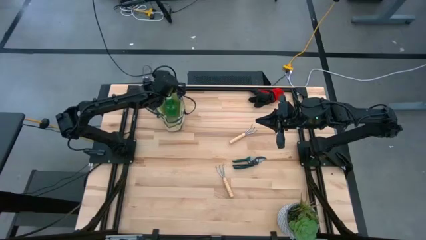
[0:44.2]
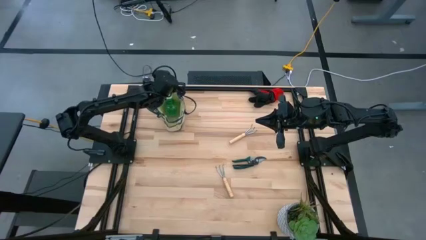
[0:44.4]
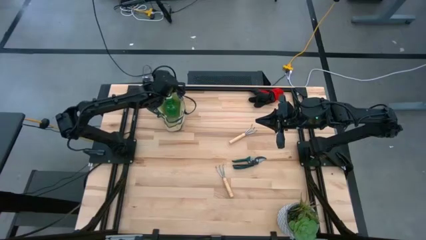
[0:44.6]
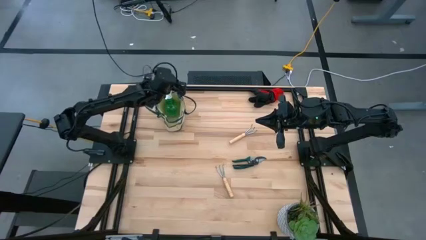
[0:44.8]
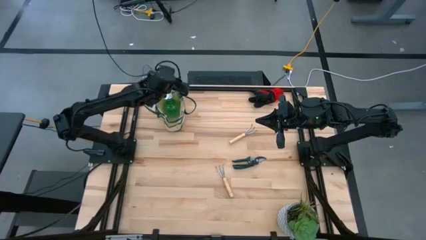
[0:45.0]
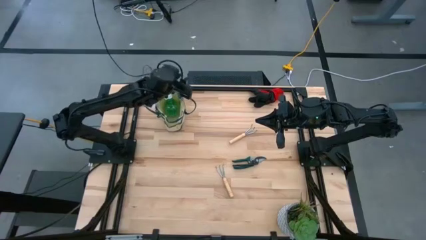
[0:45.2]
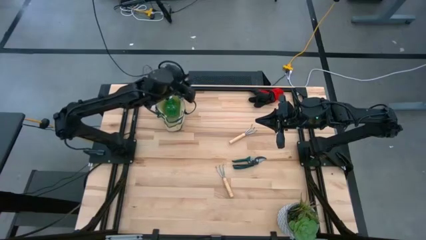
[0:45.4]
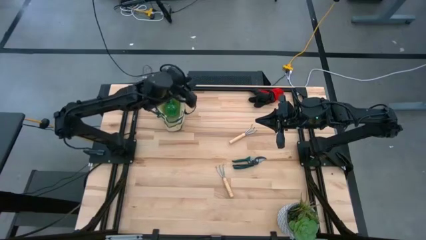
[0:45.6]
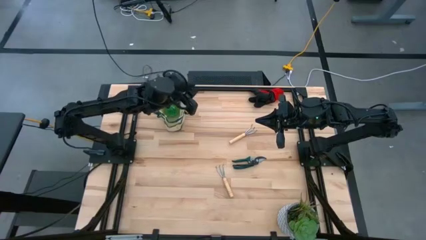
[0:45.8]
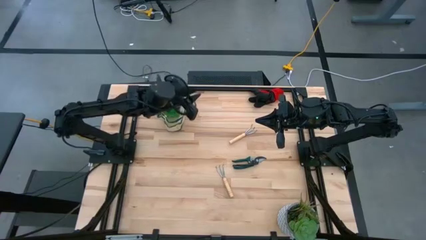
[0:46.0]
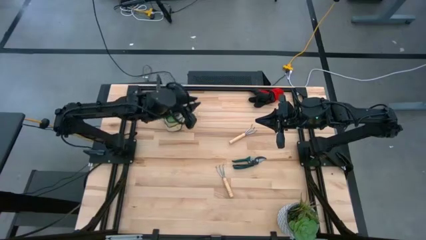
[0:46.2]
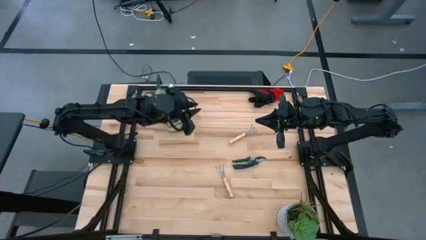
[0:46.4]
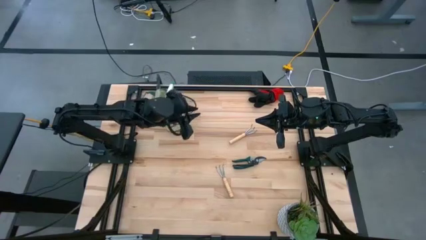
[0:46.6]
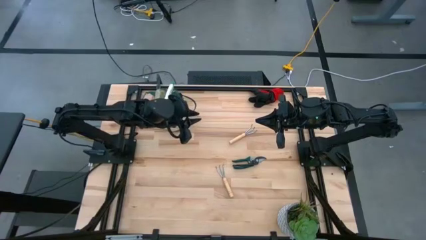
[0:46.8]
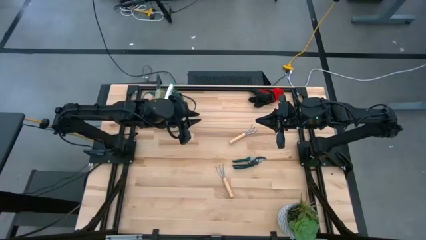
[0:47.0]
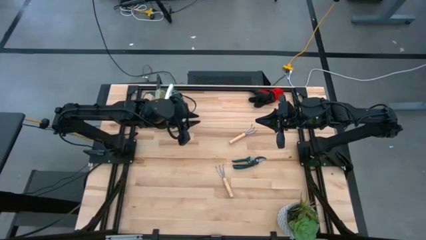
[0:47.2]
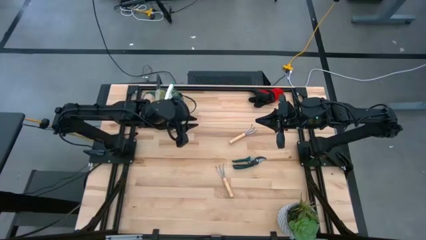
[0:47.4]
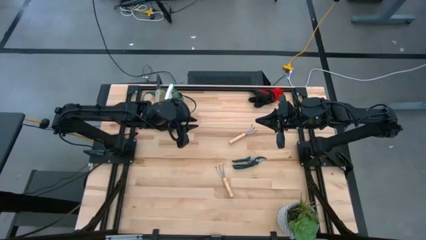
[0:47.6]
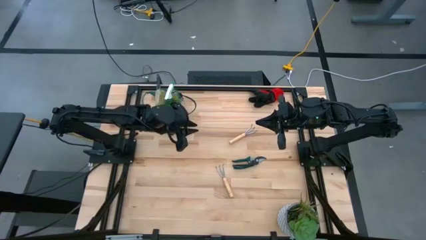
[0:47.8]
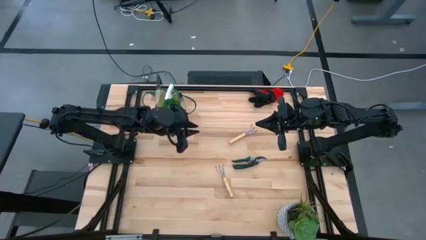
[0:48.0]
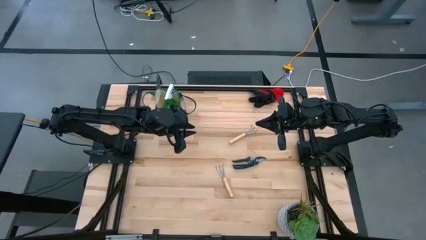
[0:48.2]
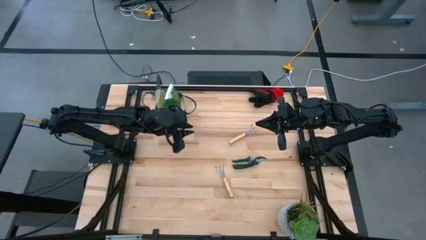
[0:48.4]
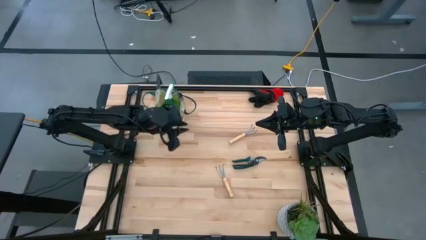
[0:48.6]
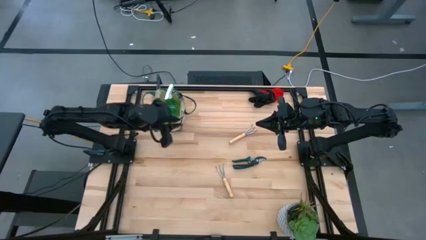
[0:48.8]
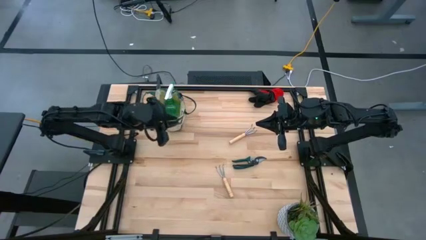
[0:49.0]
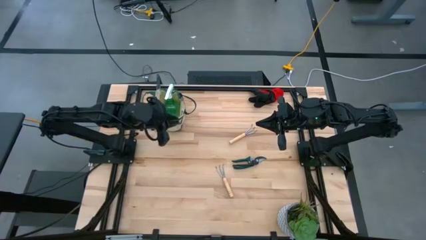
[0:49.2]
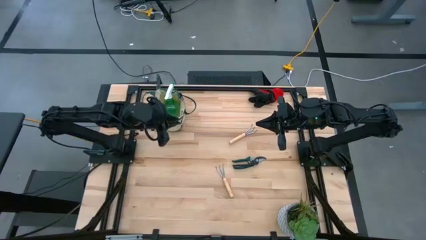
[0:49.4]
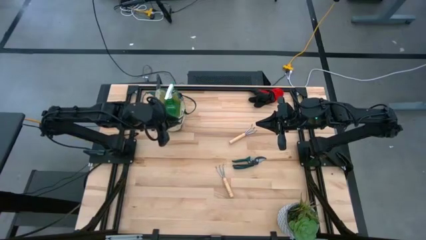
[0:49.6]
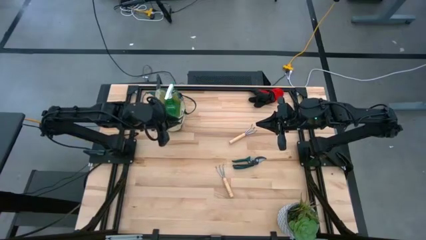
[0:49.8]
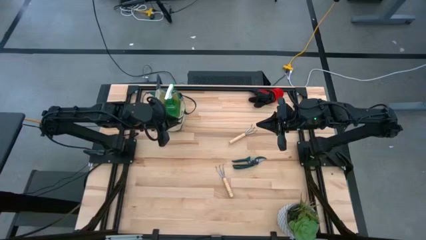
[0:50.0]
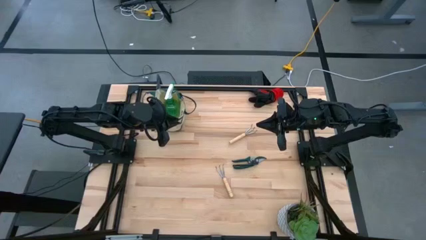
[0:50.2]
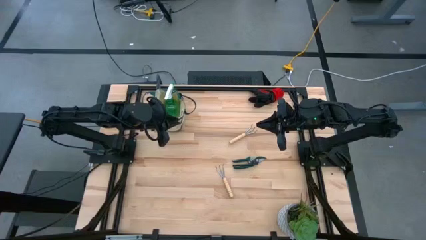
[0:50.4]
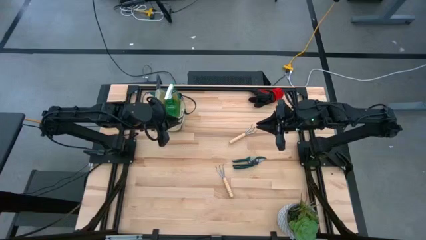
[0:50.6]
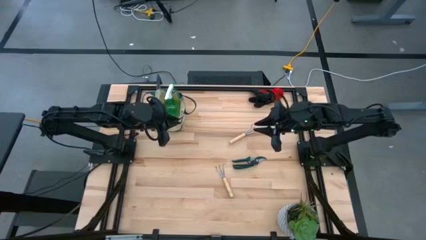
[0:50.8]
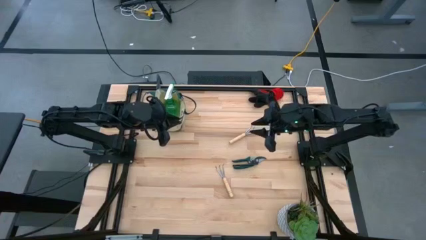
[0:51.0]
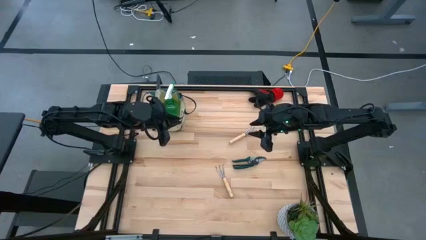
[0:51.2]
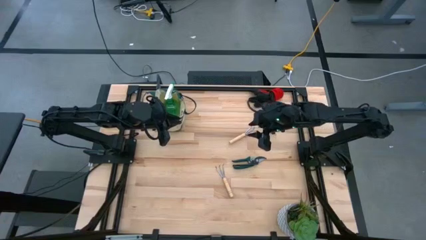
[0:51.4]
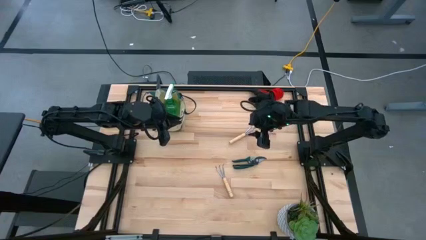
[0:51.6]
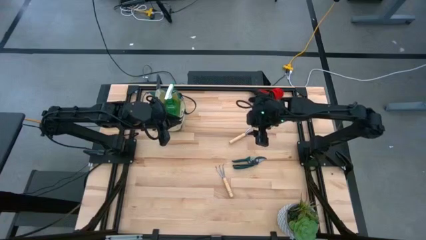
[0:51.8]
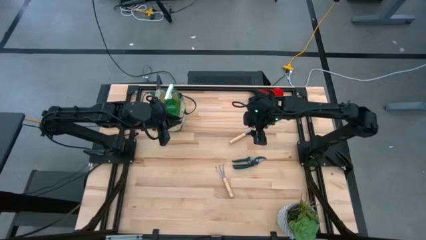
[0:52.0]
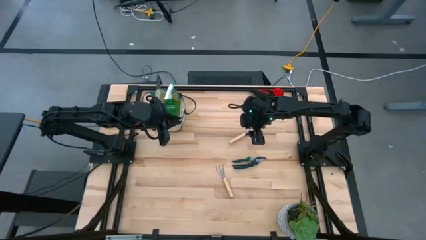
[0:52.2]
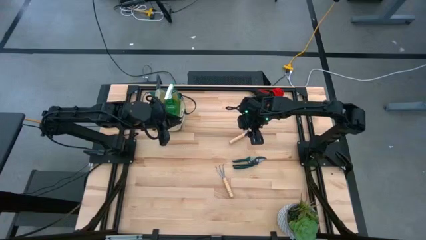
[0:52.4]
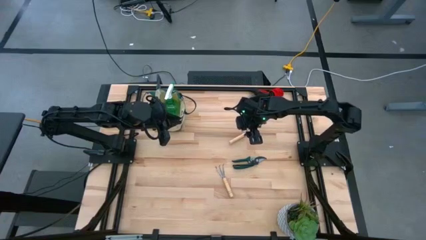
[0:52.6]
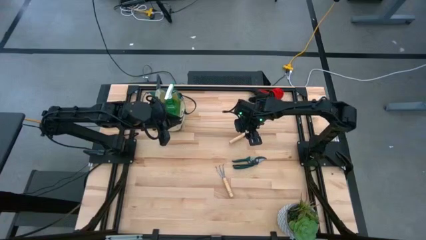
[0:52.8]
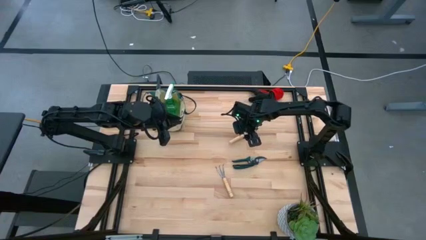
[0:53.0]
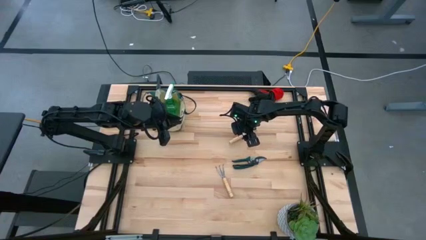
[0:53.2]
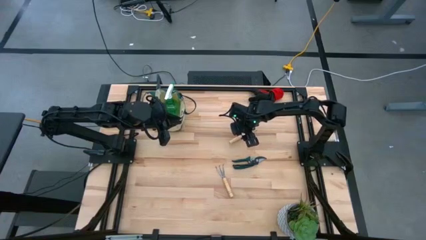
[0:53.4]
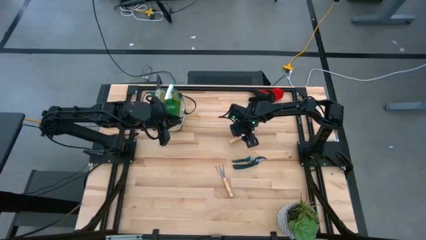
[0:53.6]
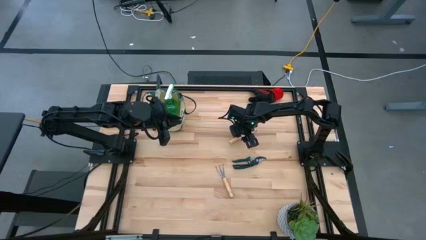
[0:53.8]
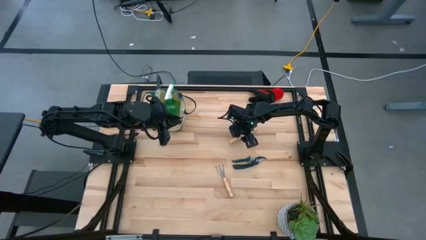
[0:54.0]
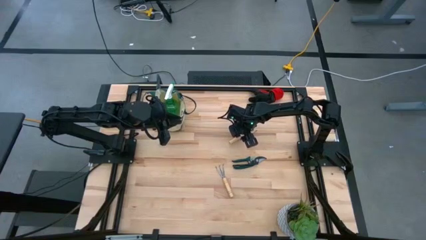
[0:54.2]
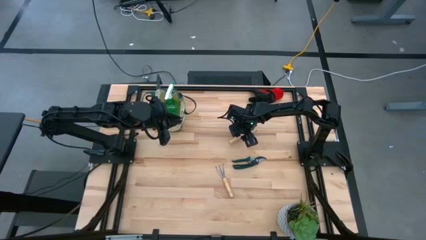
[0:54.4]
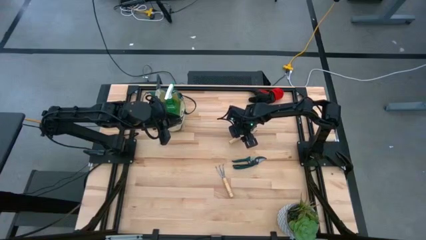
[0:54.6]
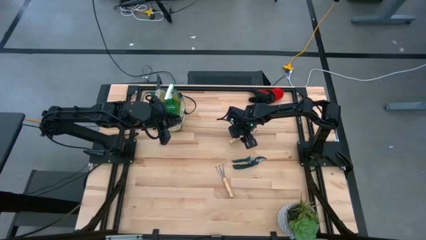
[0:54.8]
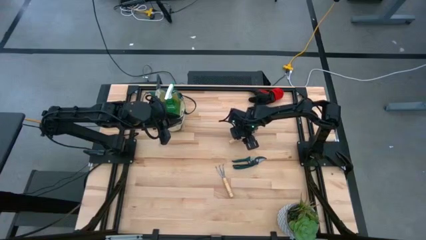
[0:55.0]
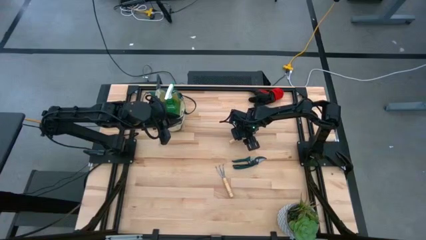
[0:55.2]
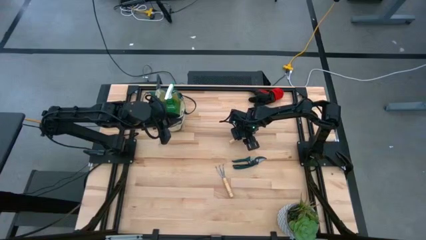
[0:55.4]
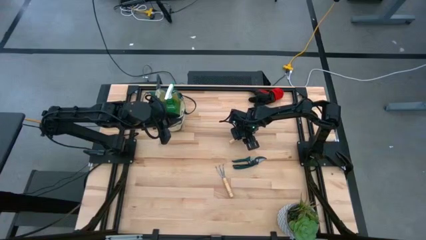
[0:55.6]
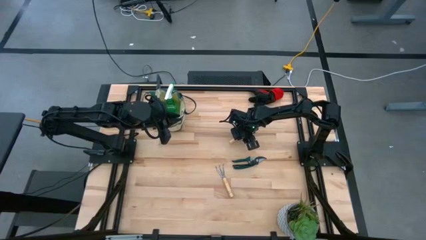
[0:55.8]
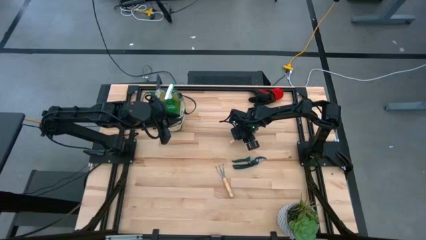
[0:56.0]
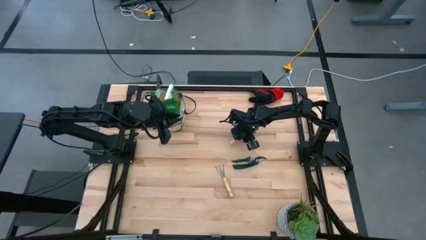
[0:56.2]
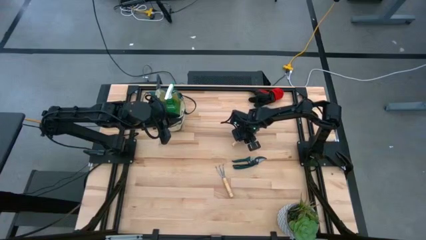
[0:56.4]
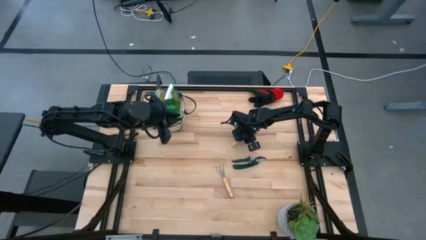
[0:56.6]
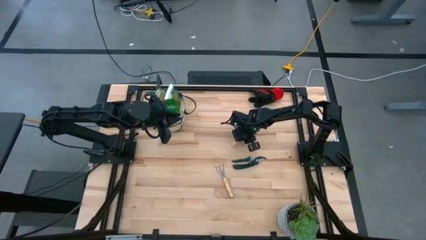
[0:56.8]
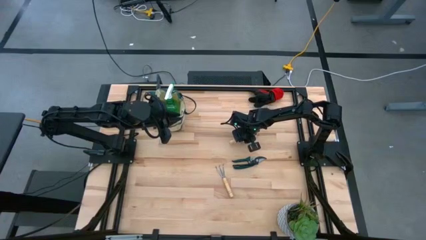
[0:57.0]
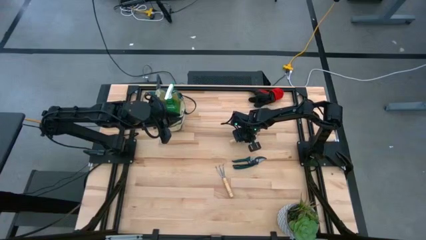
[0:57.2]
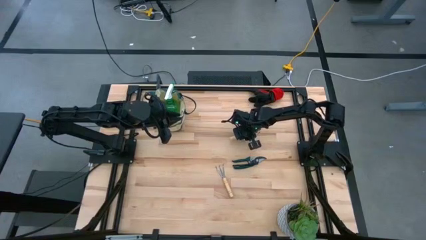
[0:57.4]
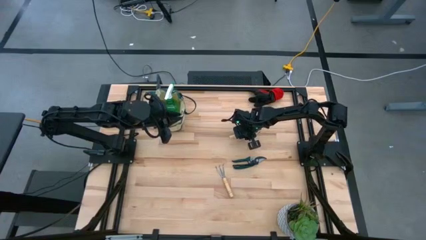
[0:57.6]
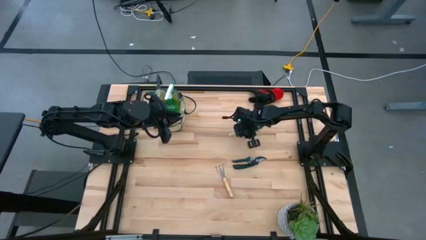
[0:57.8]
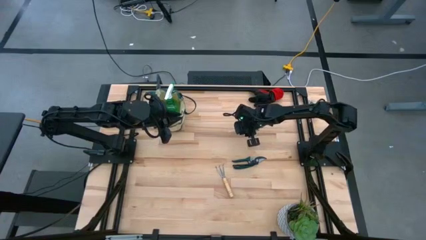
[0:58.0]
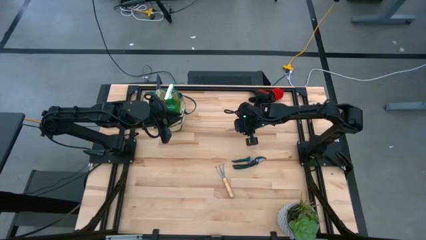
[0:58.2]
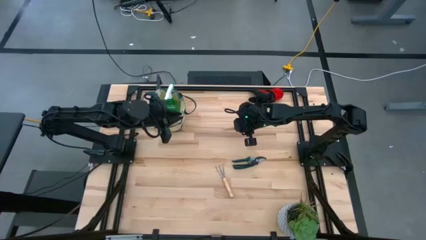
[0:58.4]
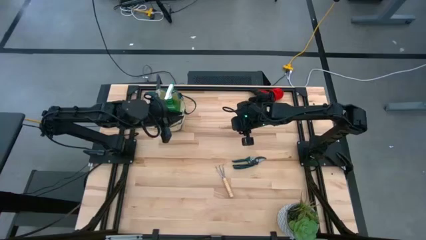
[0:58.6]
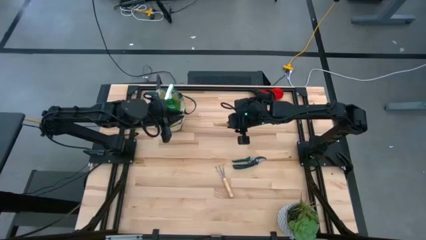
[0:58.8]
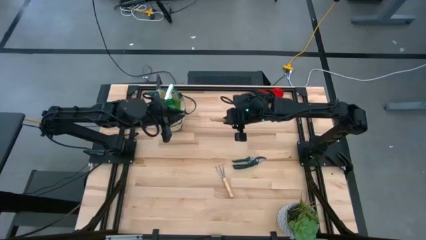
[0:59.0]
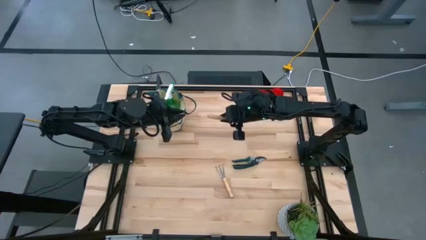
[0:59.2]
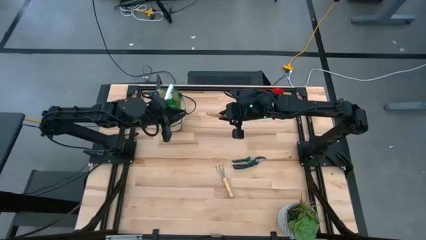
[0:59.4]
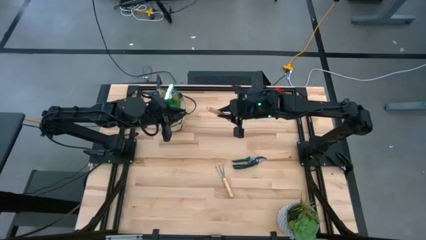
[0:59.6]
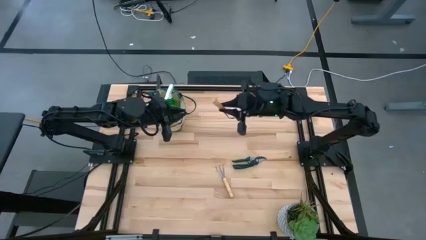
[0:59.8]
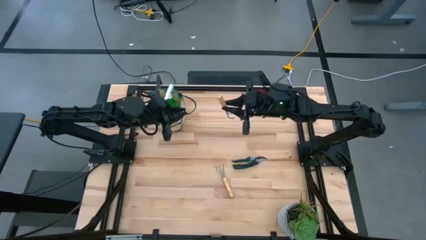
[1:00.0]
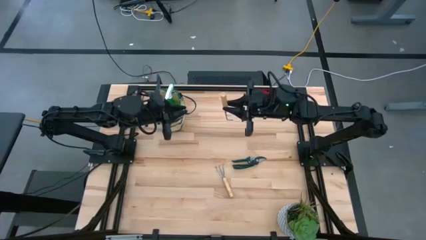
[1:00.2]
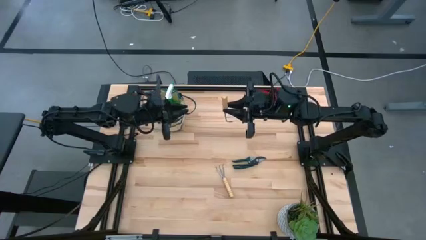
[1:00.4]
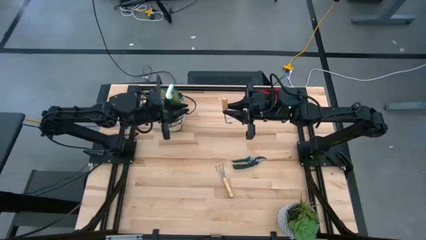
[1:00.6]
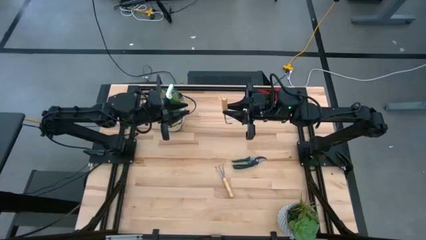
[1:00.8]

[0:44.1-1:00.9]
Task: Pick & Place Garden tools in Gardening bag
Put the brown hand rake into the gardening bag
